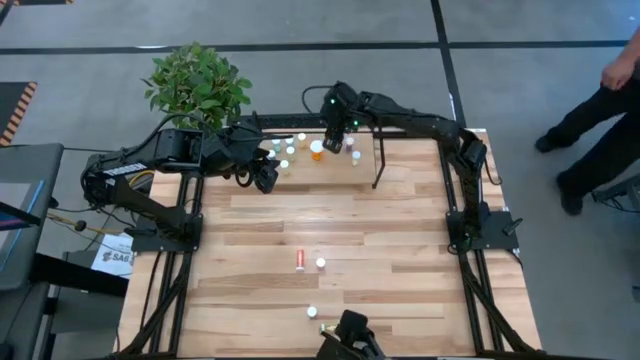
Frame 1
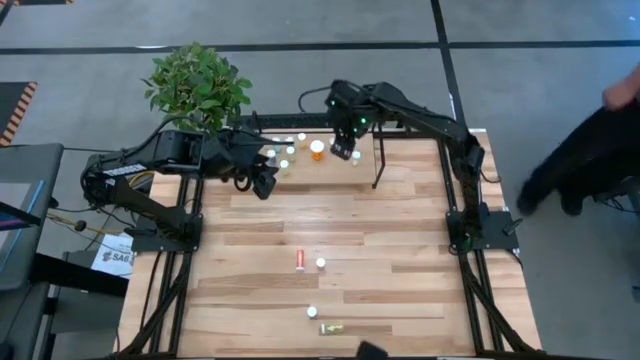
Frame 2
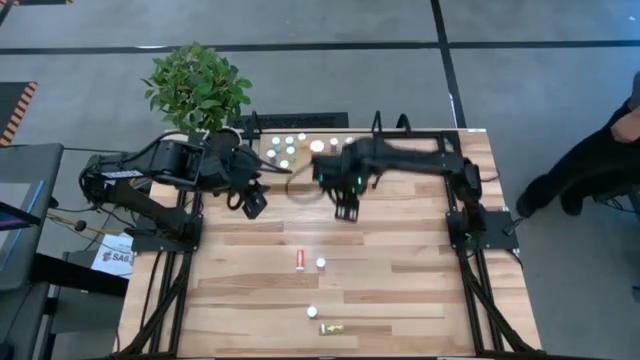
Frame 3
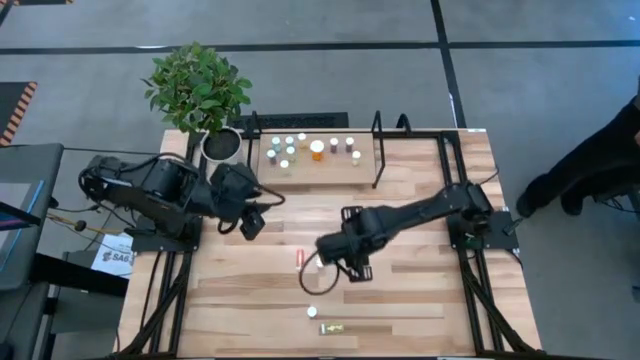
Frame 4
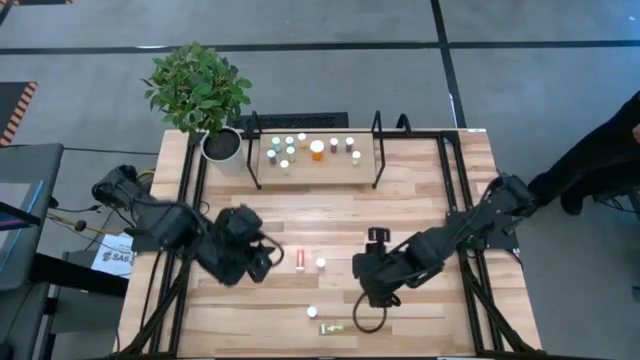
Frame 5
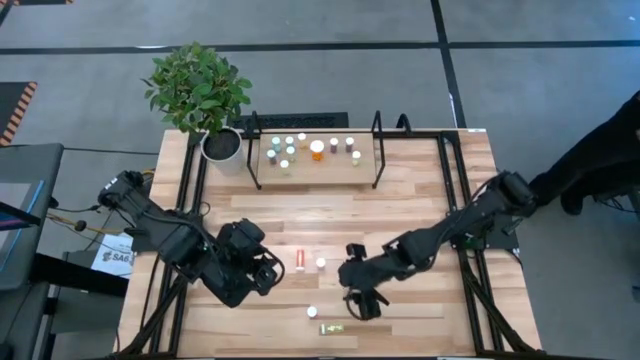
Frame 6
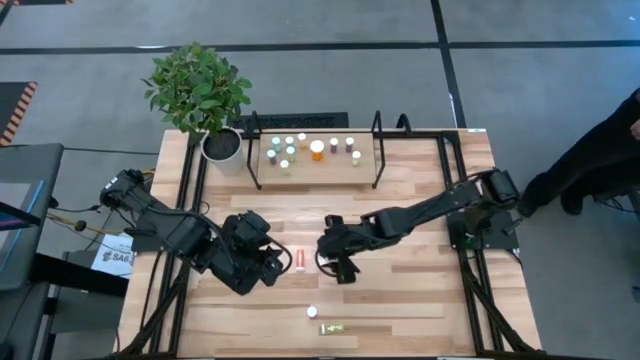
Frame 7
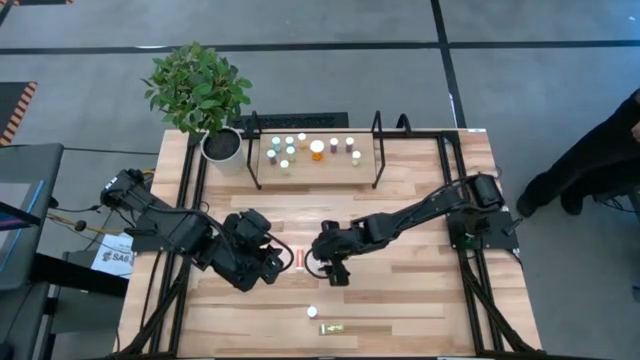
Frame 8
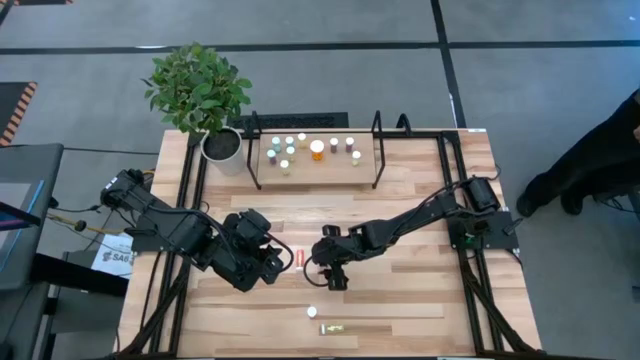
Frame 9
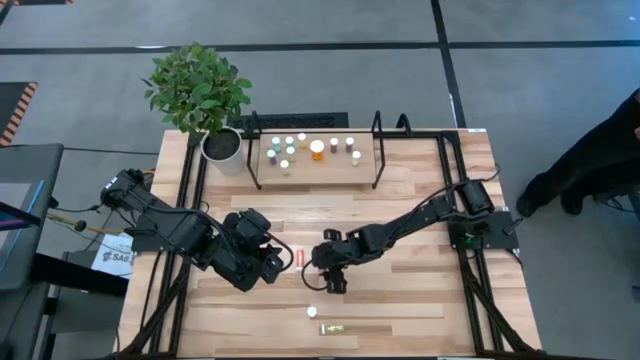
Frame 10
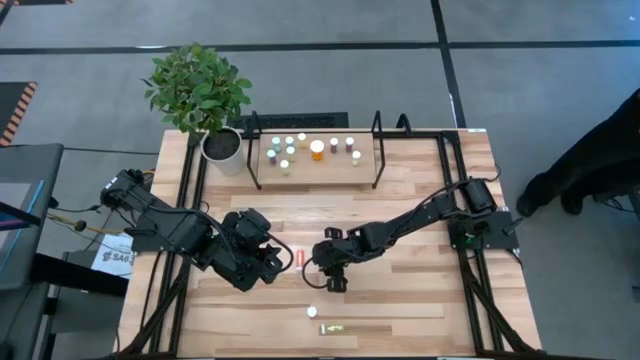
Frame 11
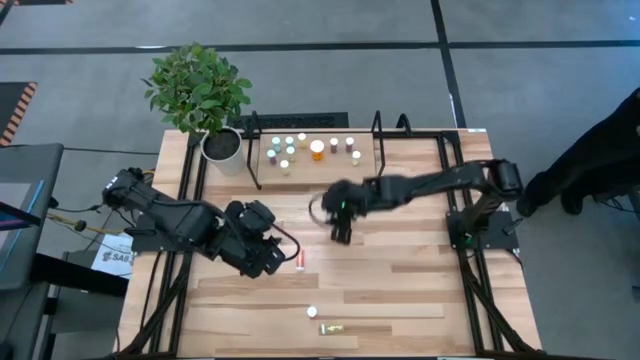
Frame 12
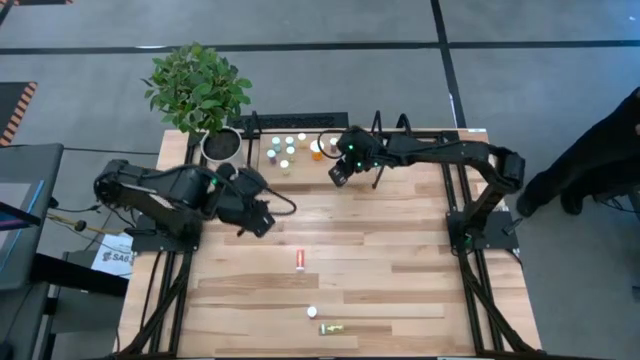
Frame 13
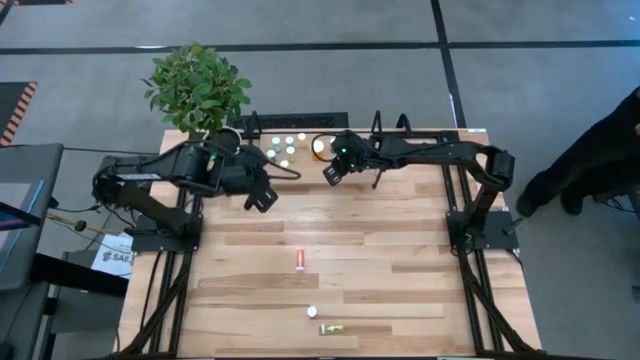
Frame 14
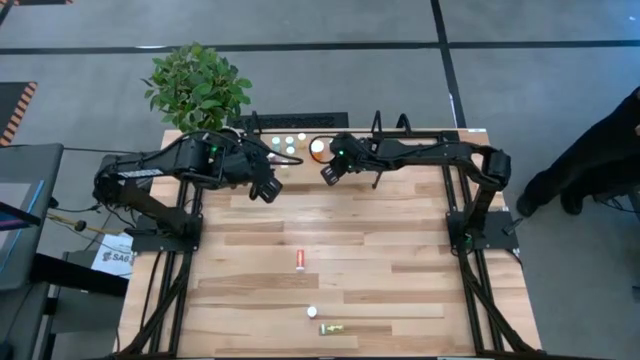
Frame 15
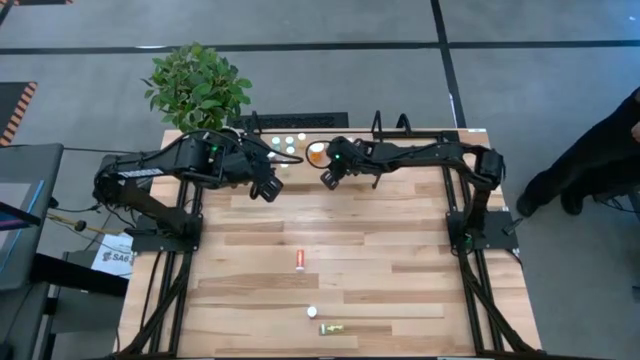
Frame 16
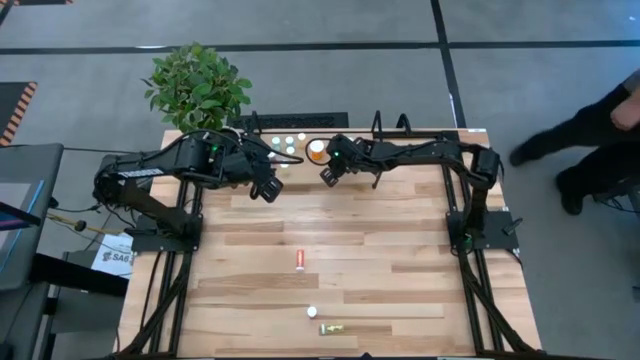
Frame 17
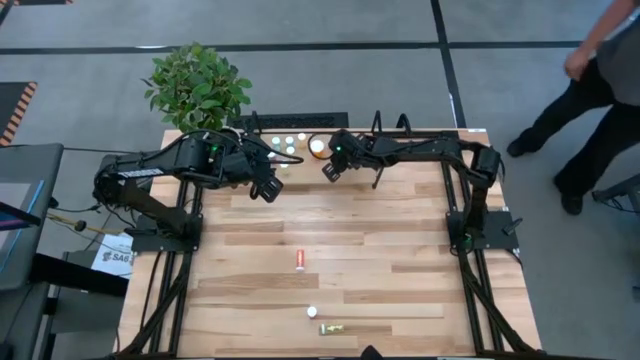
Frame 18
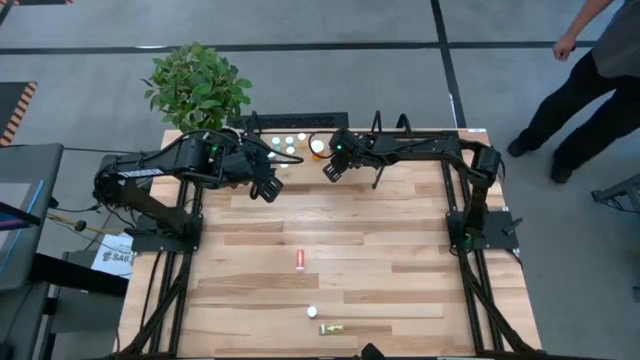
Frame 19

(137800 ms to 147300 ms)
Task: Pick and place medicine bottles onto shelf by color
Put the pink pill bottle on the shelf

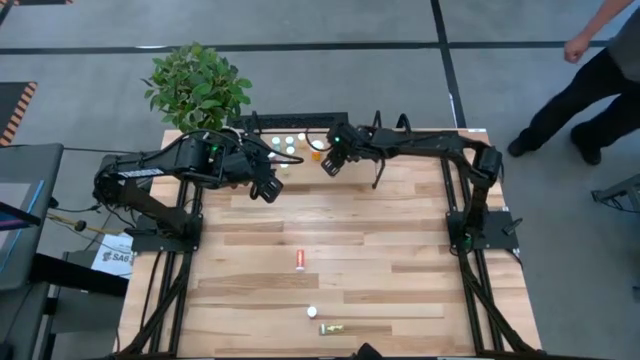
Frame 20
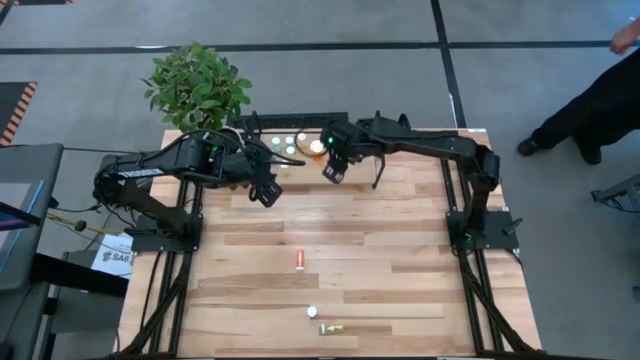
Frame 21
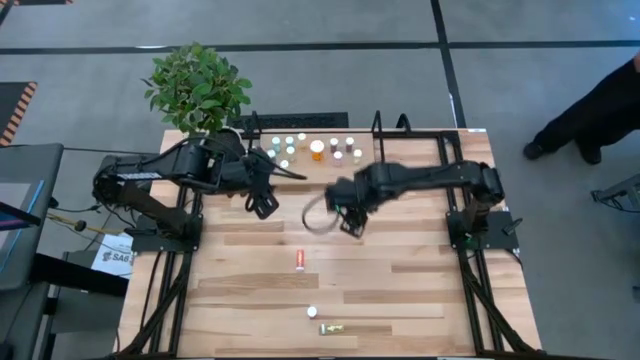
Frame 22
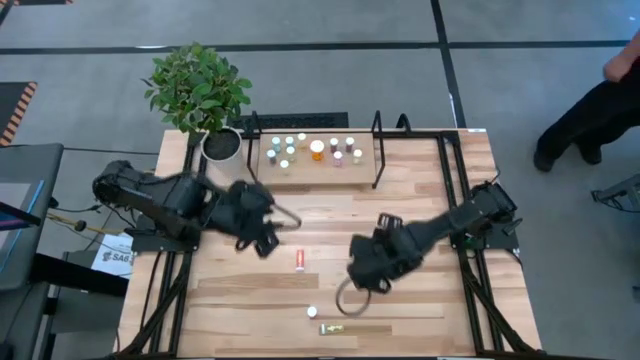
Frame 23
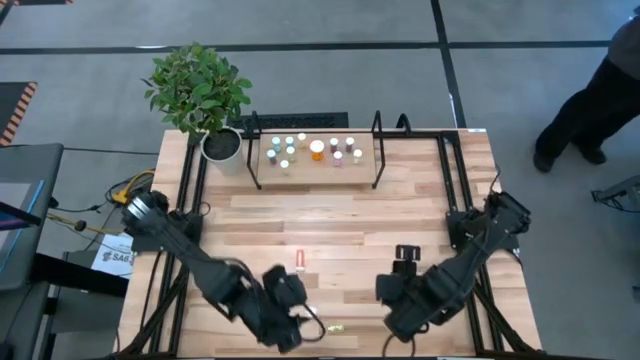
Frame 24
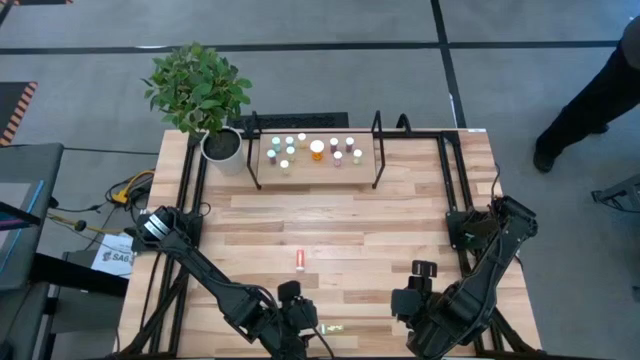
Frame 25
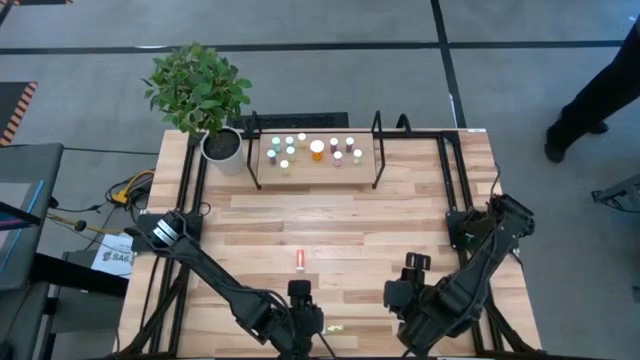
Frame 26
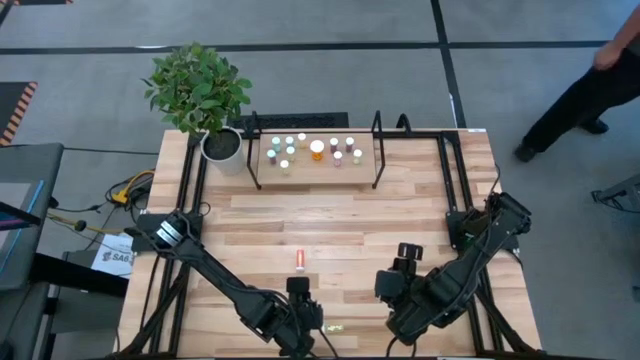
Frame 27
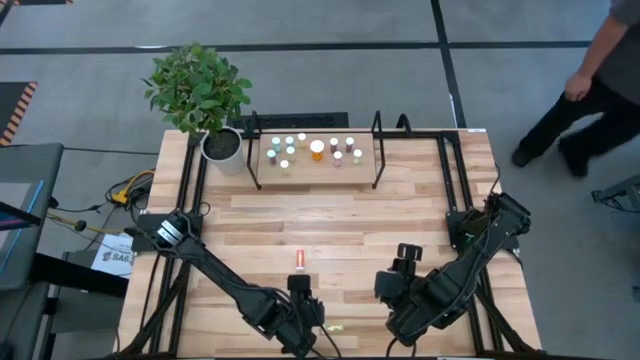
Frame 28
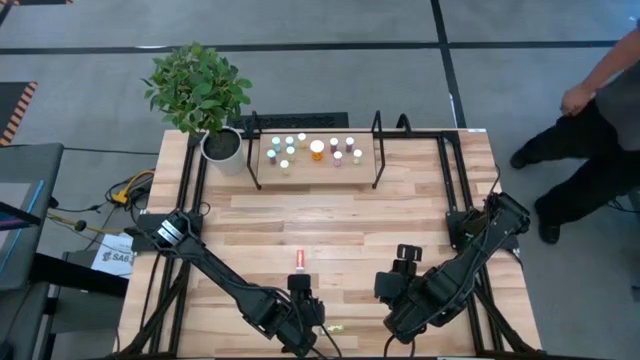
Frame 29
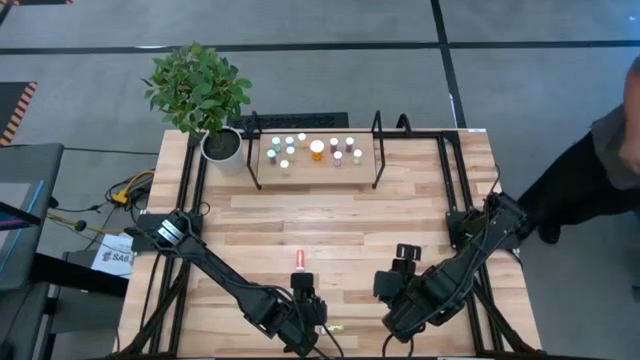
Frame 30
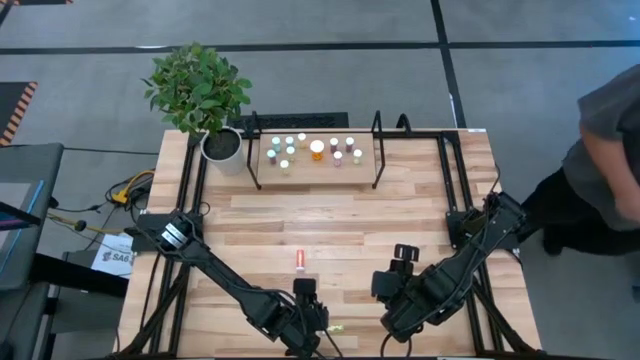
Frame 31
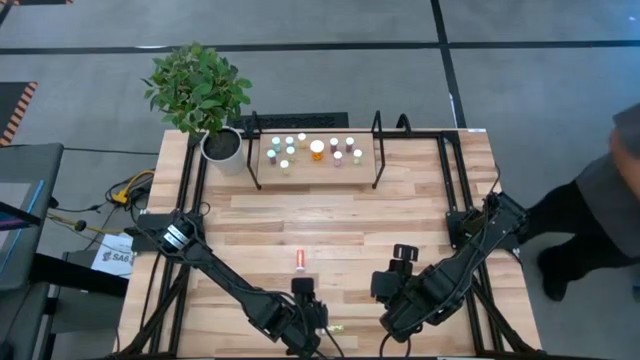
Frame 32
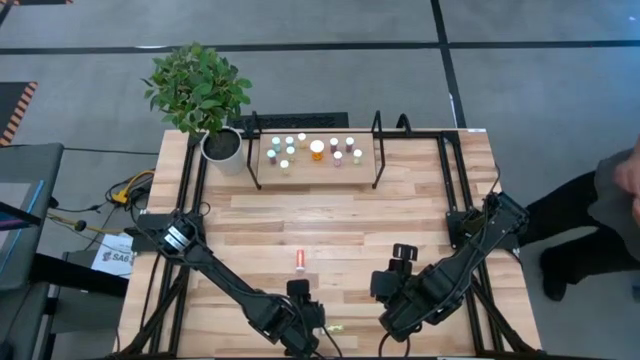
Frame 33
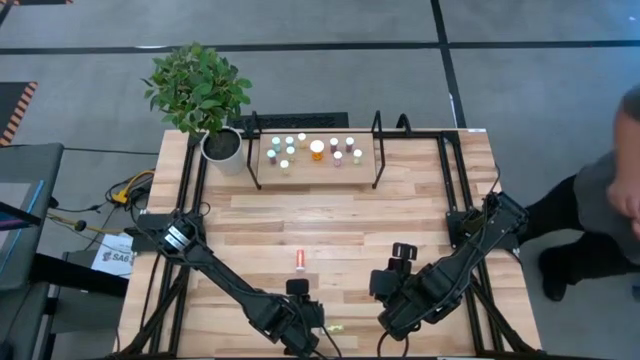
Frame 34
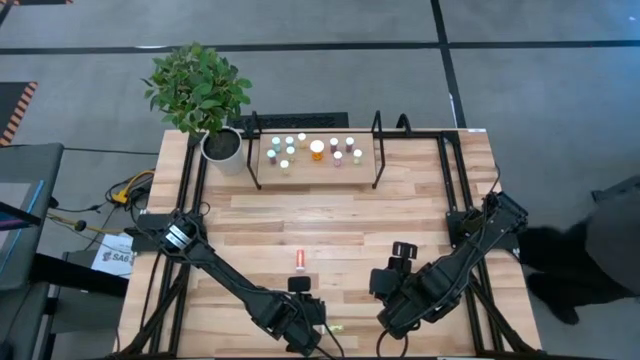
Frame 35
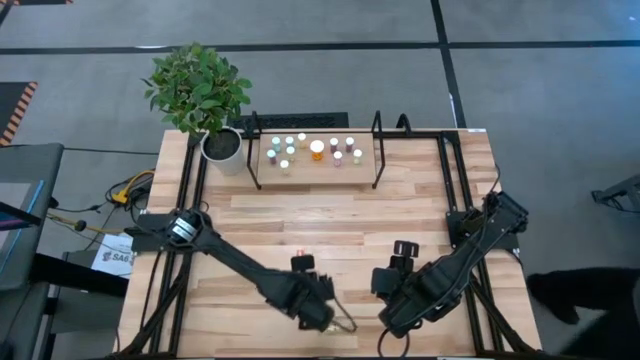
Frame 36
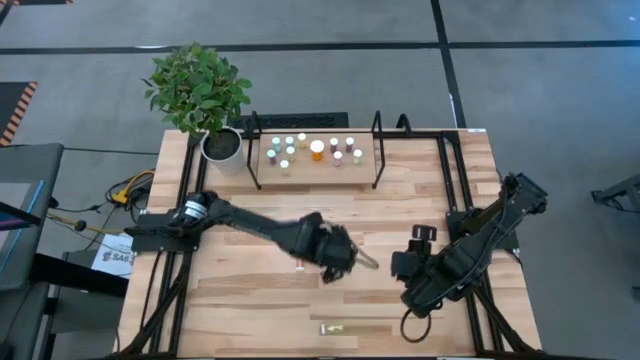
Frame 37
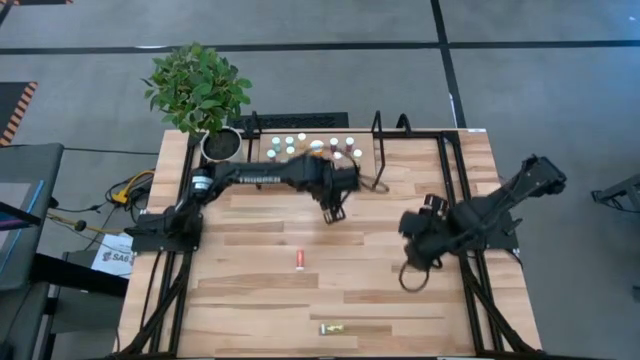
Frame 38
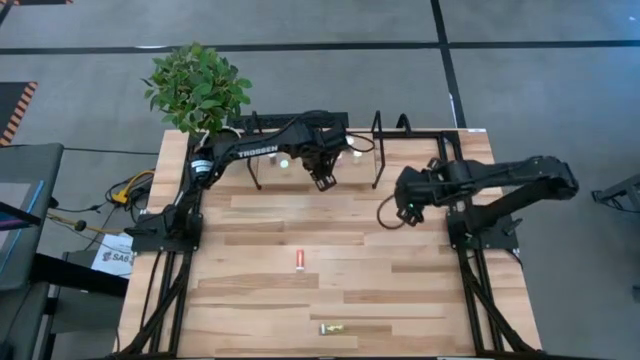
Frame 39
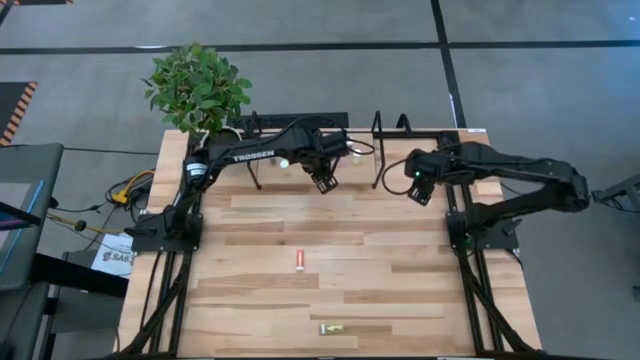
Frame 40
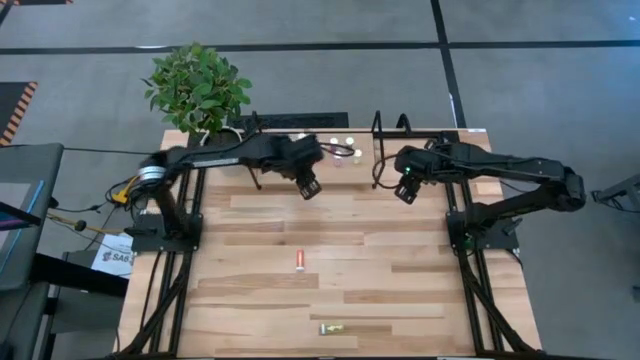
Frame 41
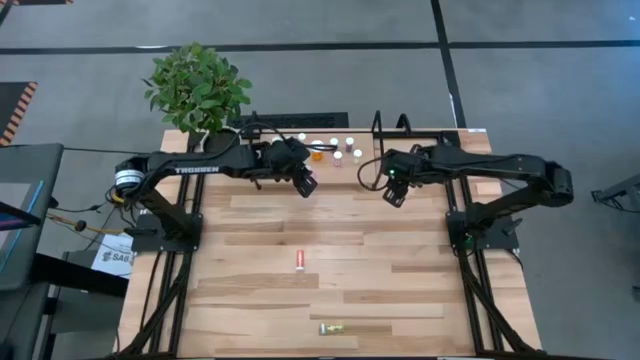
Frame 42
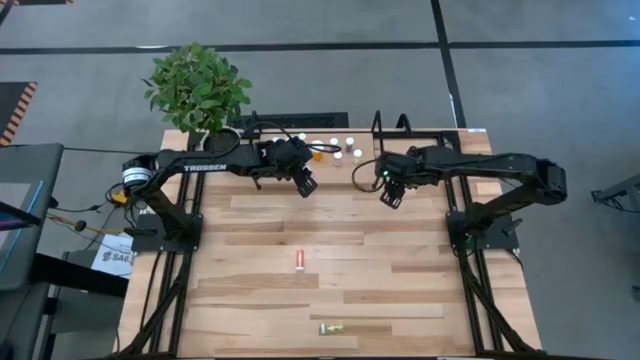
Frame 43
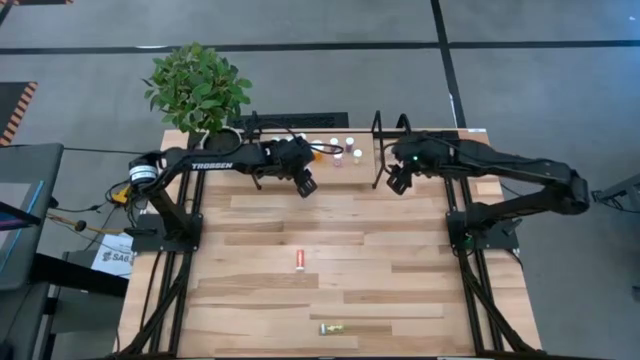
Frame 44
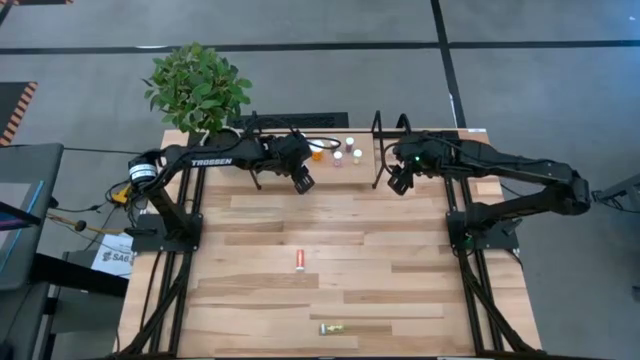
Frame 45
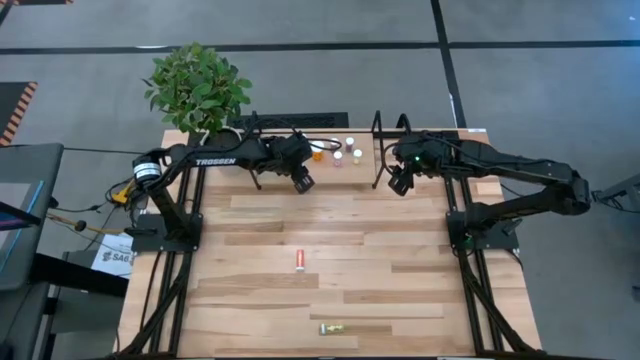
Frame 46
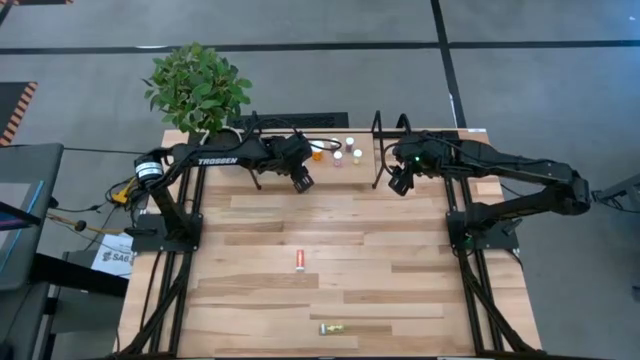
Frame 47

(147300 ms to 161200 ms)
Put the pink pill bottle on the shelf
